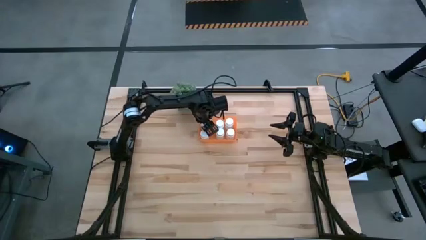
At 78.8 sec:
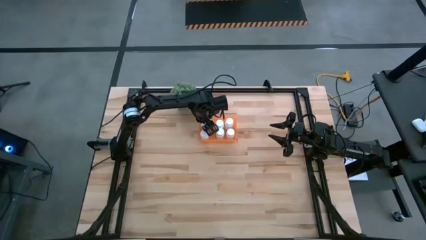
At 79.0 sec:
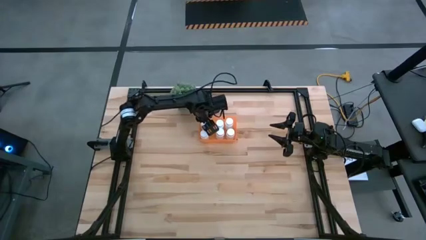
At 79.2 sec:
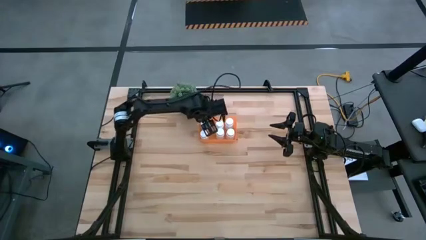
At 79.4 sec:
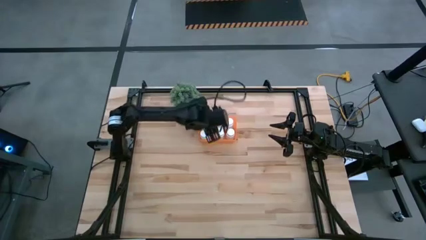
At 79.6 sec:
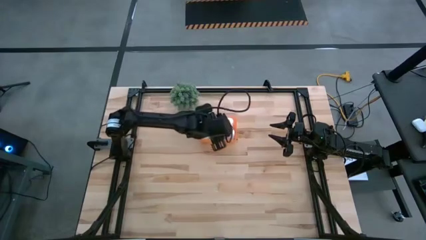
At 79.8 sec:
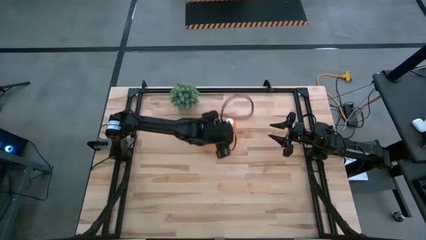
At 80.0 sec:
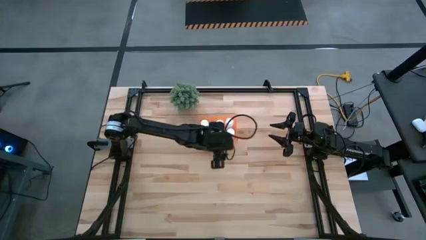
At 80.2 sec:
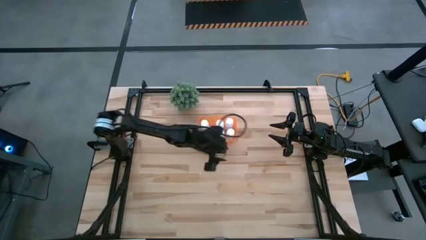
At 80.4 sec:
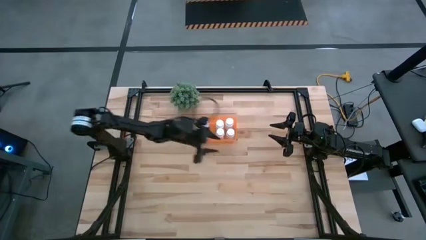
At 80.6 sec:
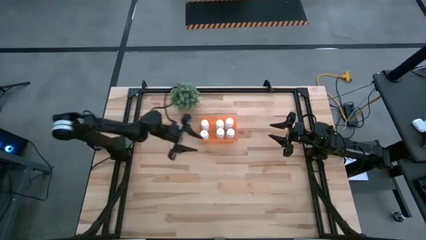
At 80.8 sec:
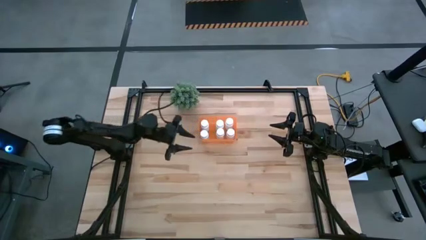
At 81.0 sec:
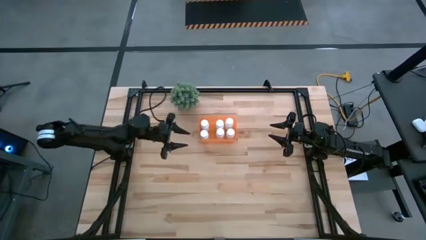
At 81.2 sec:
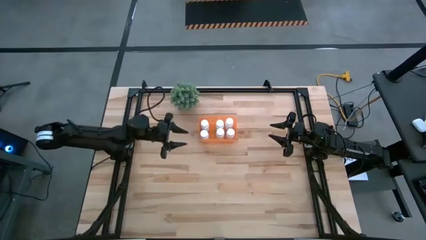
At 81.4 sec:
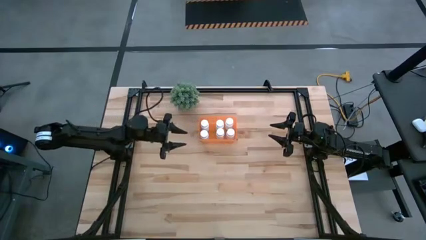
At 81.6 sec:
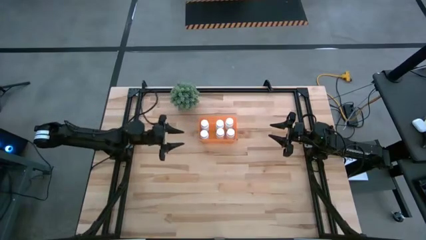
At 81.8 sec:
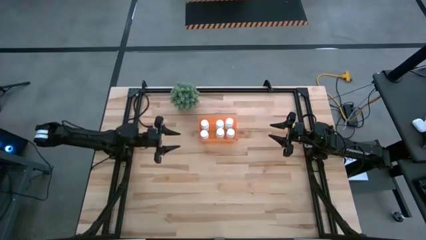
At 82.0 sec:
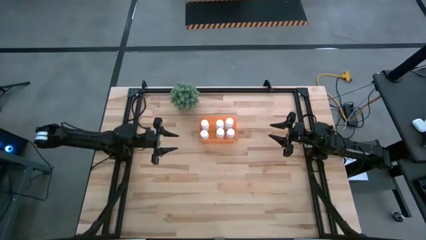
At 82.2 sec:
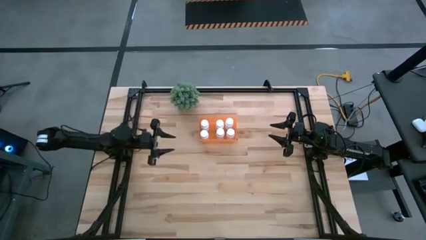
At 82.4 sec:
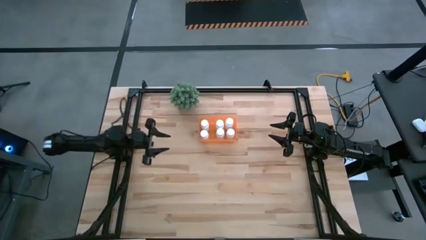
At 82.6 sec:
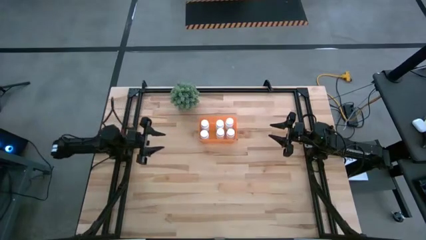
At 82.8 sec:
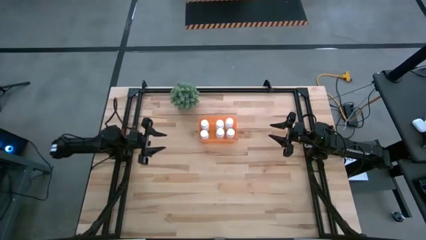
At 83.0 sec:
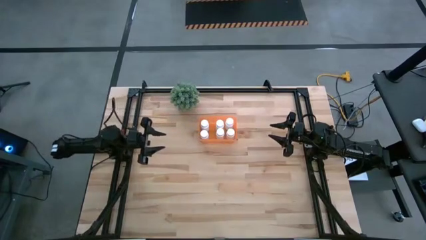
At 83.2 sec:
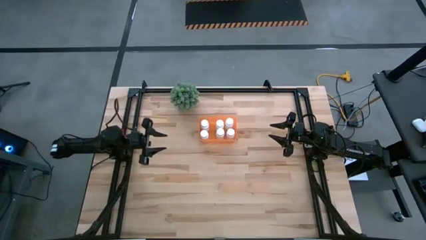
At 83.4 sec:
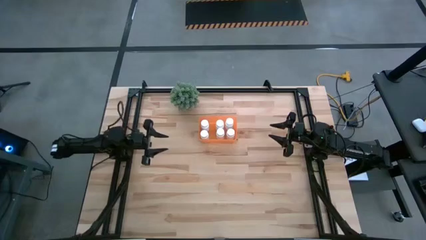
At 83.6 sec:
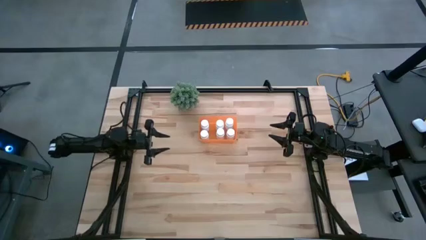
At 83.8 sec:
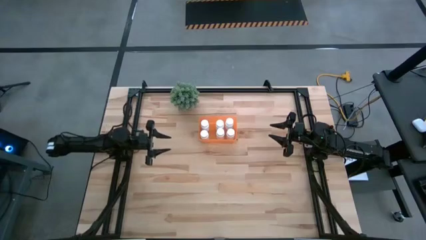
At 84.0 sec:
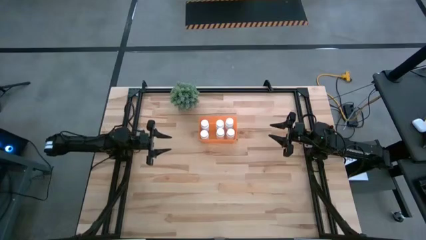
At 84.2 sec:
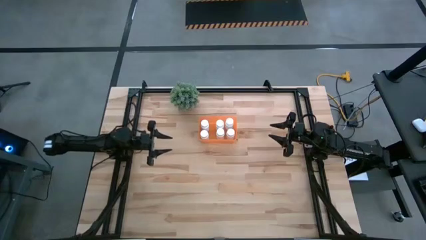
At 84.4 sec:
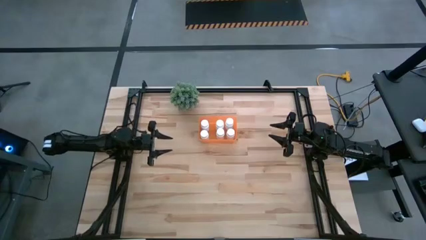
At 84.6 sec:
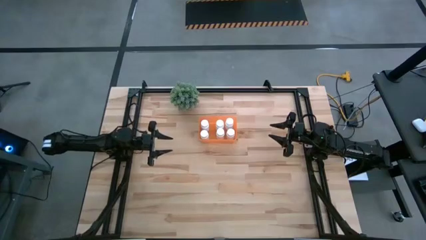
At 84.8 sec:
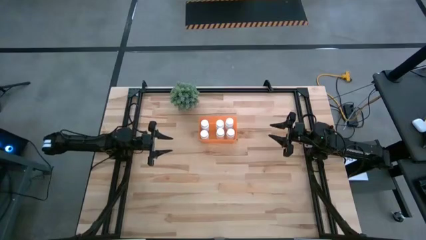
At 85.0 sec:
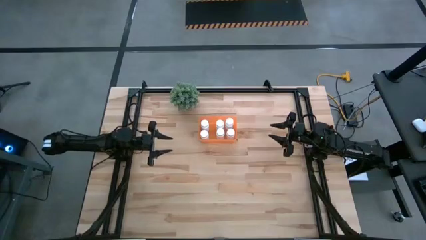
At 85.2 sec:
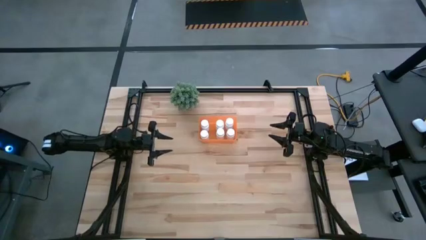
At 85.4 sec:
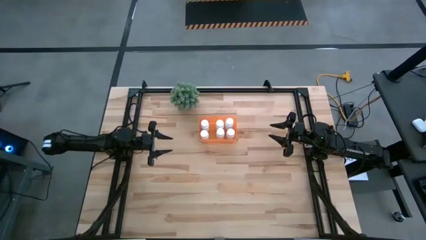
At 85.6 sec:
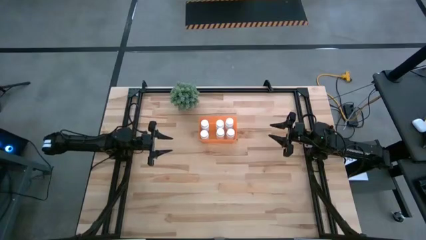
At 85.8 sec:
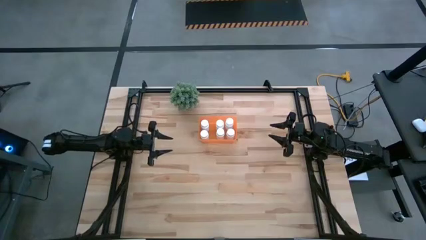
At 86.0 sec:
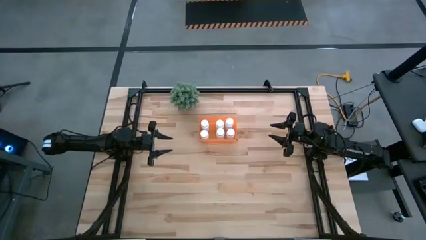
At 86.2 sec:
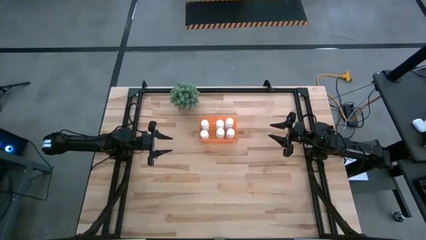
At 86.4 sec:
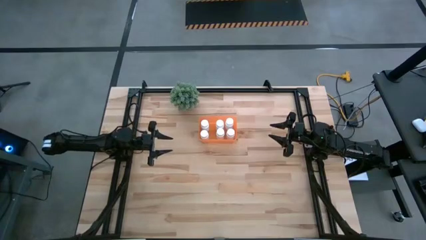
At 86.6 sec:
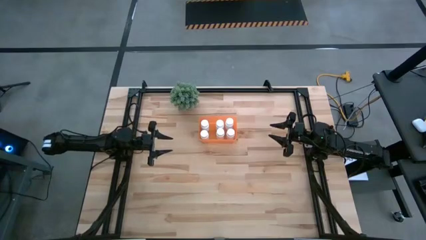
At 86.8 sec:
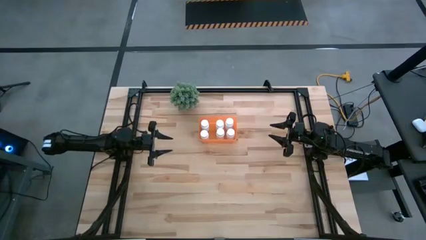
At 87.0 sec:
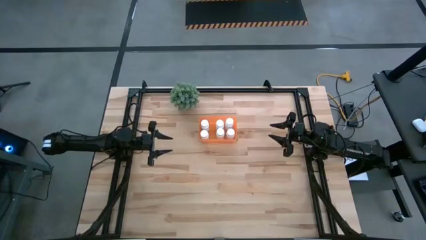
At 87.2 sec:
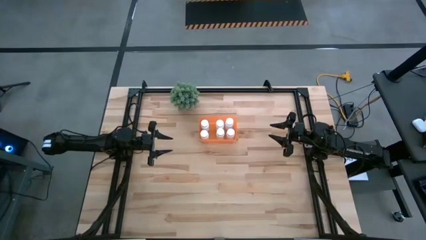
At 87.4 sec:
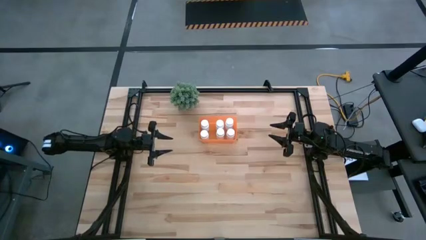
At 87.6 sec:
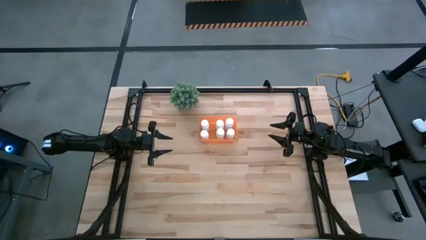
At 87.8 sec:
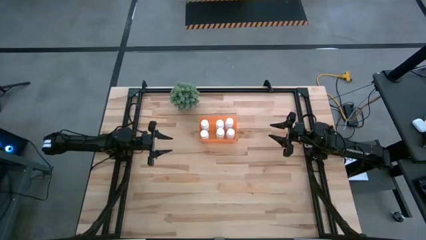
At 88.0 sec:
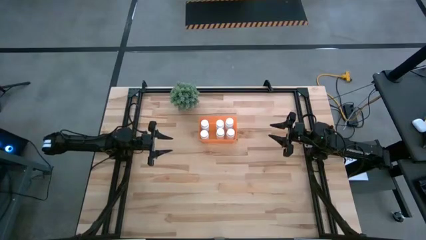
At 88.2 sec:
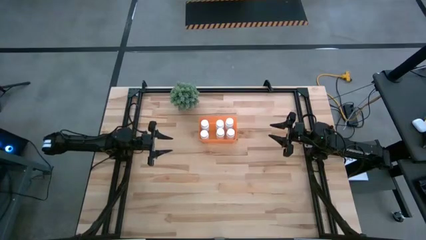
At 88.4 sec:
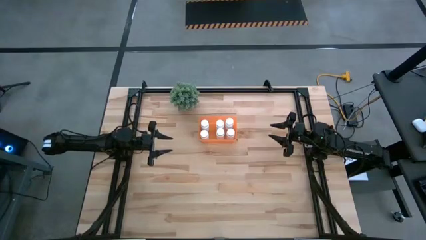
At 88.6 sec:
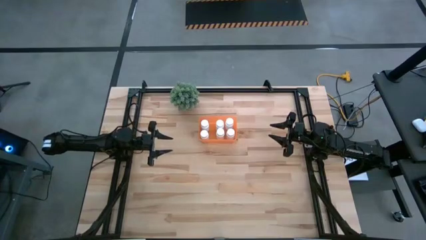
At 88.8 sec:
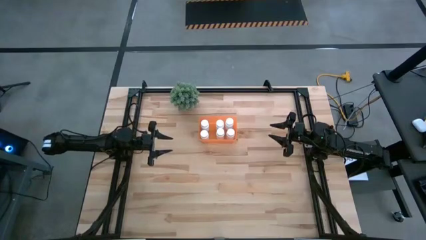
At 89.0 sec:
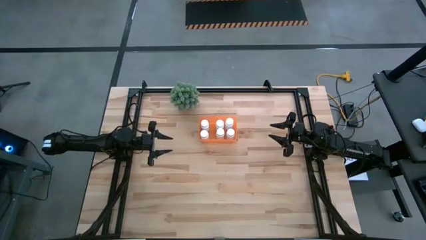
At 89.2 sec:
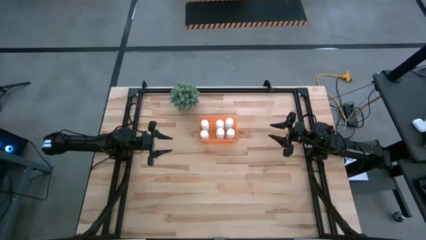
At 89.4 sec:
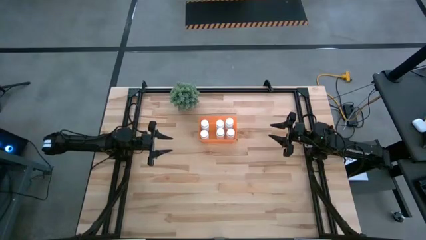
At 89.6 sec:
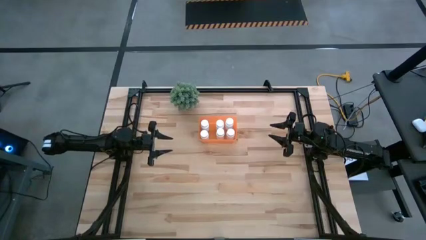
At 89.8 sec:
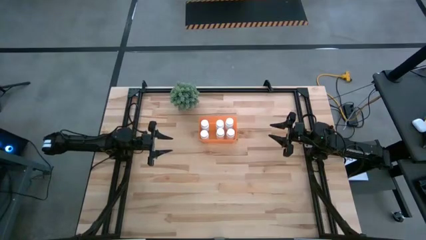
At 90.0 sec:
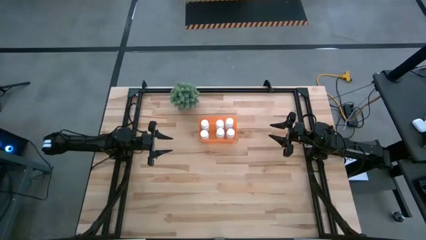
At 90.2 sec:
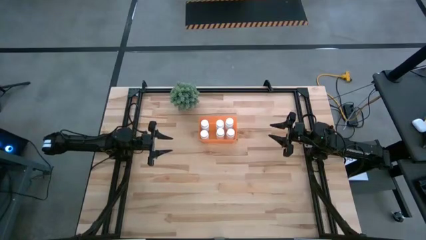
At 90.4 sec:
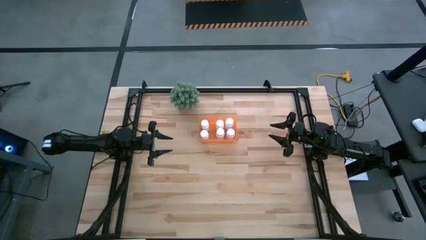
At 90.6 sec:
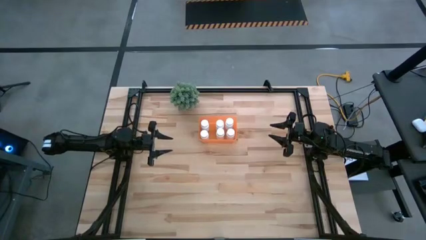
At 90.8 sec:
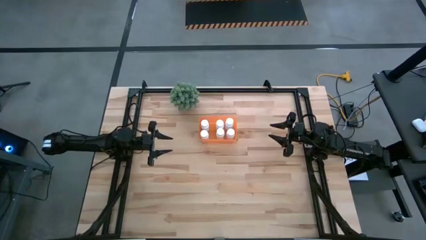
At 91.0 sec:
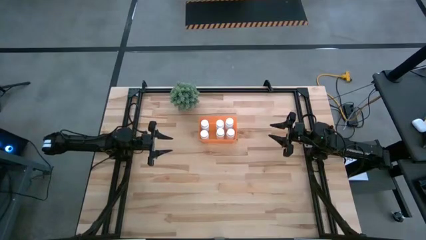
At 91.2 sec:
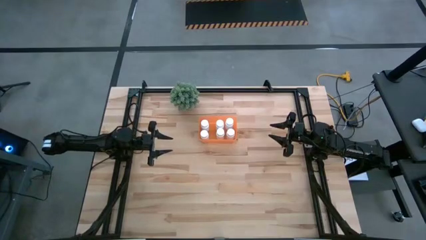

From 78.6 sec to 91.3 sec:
Task: Pick and place pill bottles into a basket
Return to Home Position

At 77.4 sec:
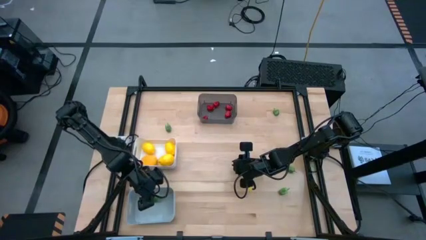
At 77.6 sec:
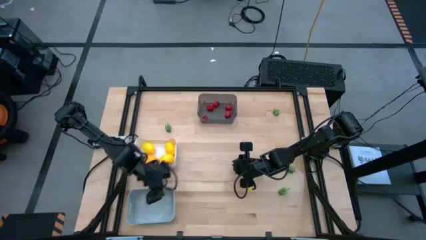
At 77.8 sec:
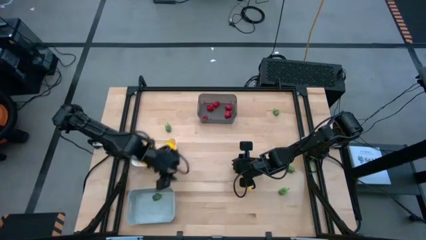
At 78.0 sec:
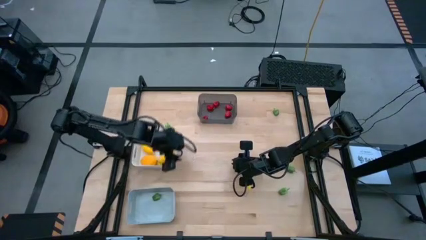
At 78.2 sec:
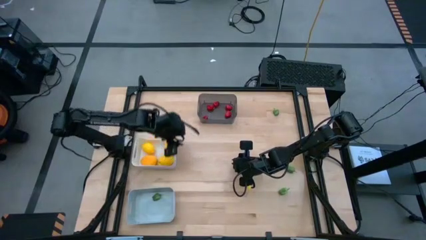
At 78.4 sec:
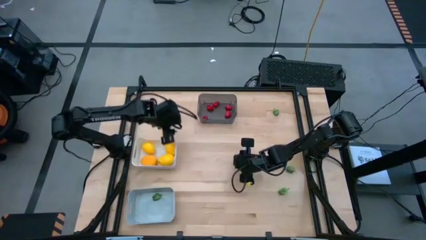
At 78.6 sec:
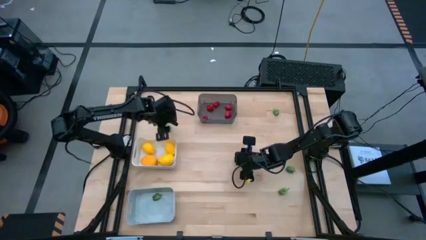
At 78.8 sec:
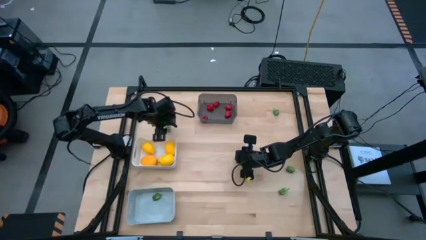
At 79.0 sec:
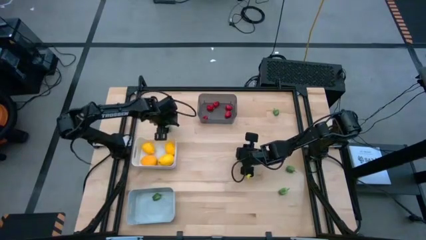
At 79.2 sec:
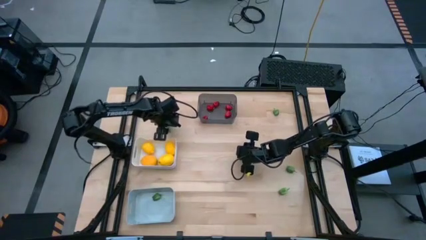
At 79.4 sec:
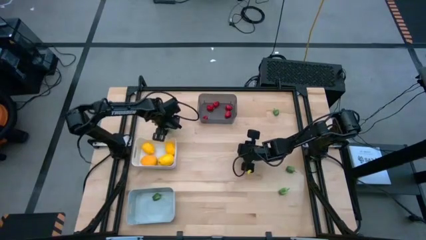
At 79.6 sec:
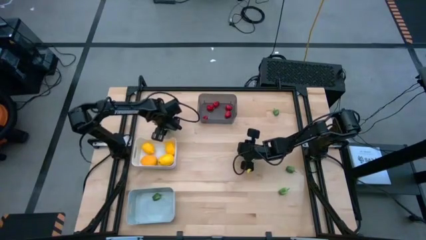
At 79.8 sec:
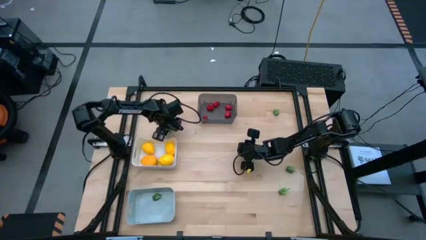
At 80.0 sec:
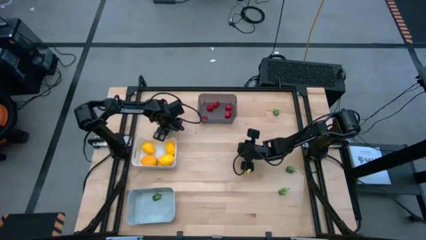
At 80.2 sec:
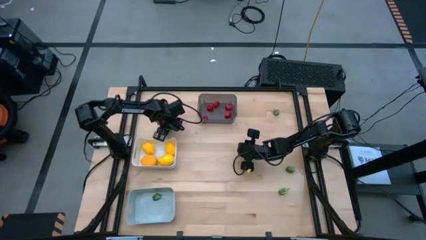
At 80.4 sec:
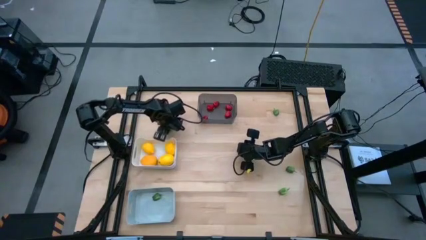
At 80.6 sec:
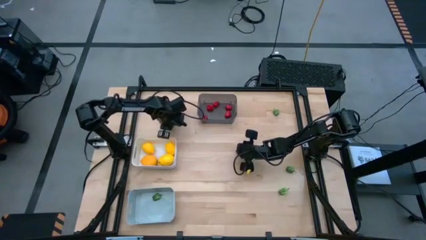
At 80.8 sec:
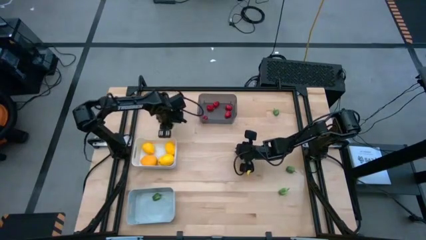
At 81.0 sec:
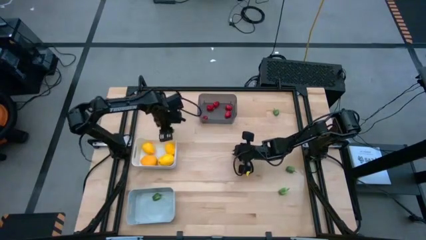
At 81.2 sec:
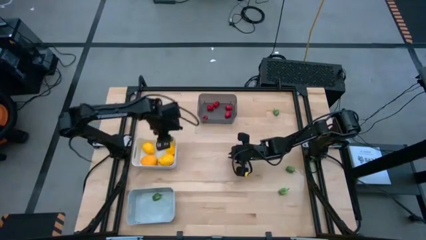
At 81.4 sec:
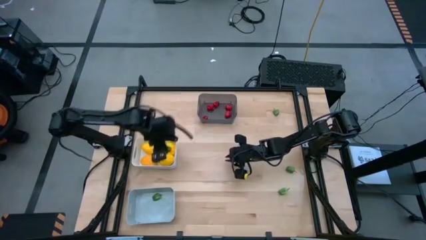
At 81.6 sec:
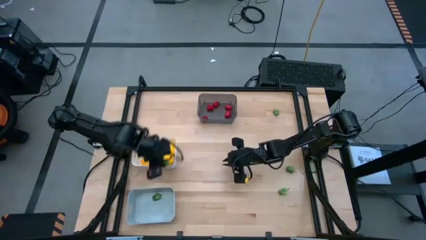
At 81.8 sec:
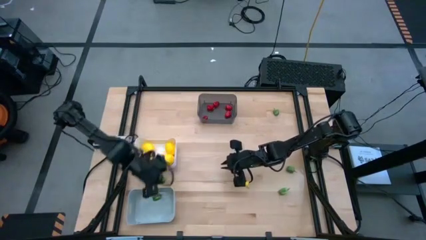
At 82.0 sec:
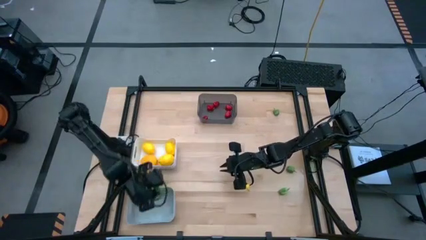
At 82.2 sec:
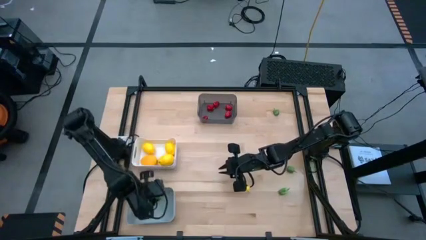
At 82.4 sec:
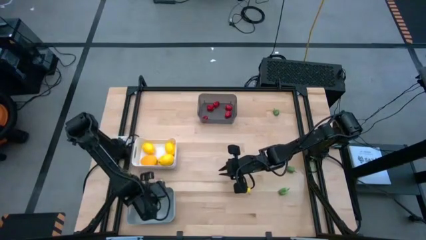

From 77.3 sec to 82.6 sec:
Task: Sort produce into baskets
Put the green chili pepper into the gray bin
